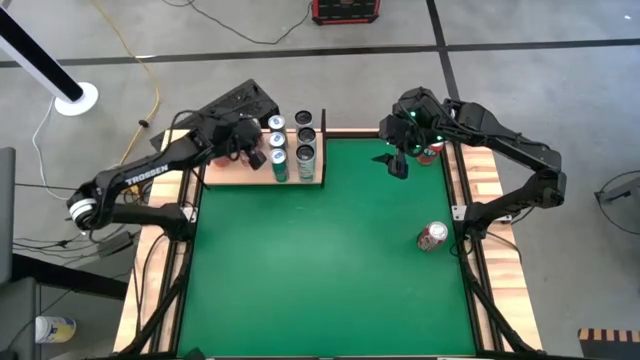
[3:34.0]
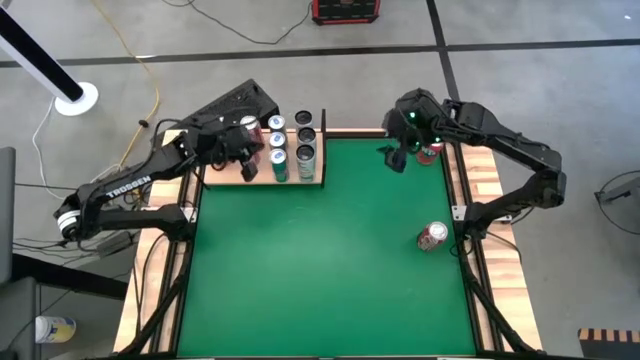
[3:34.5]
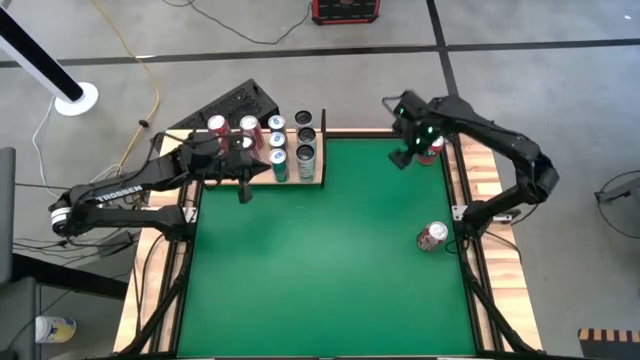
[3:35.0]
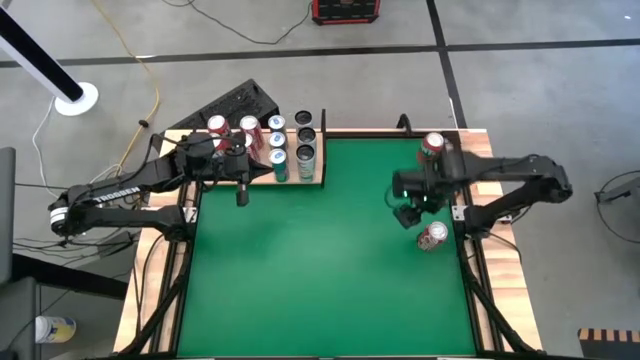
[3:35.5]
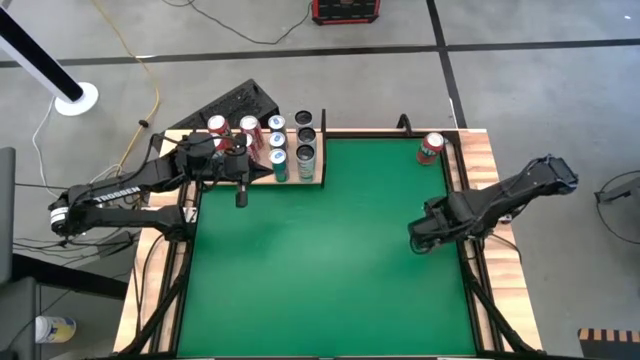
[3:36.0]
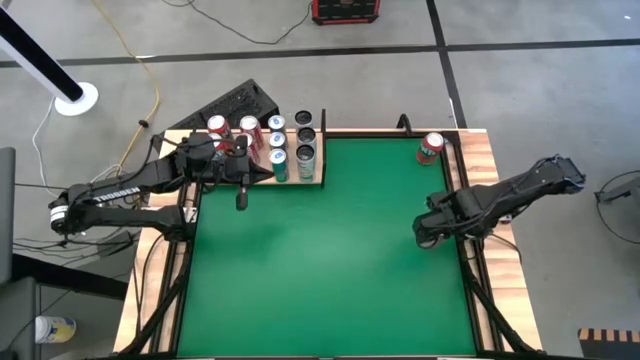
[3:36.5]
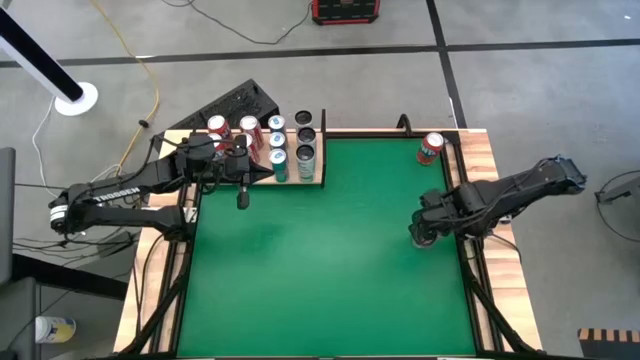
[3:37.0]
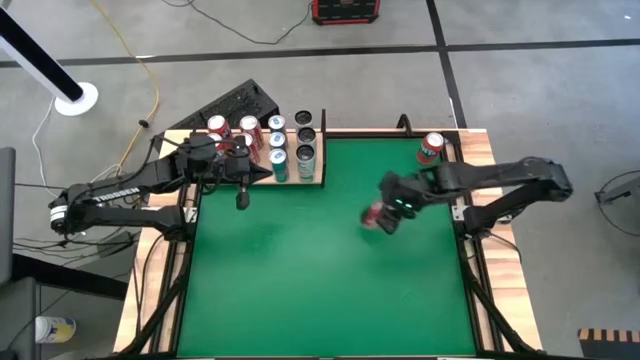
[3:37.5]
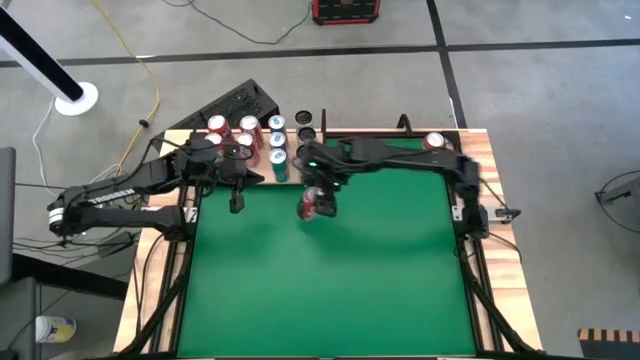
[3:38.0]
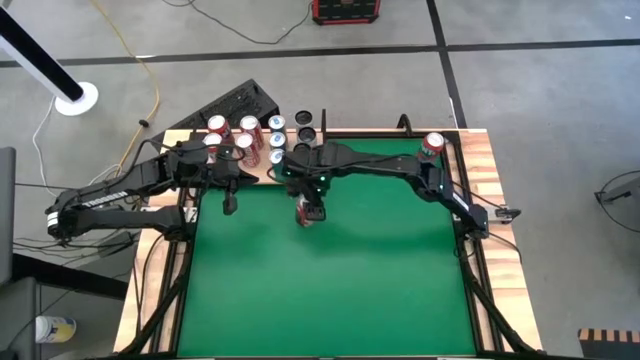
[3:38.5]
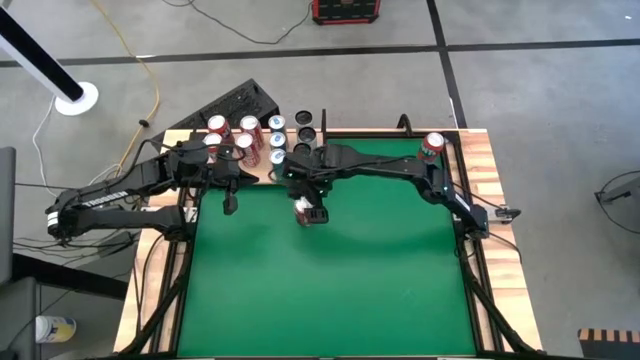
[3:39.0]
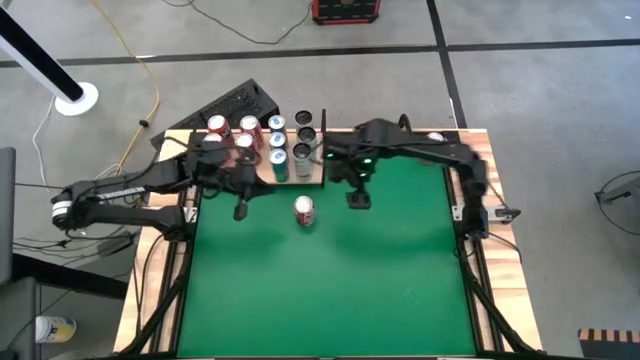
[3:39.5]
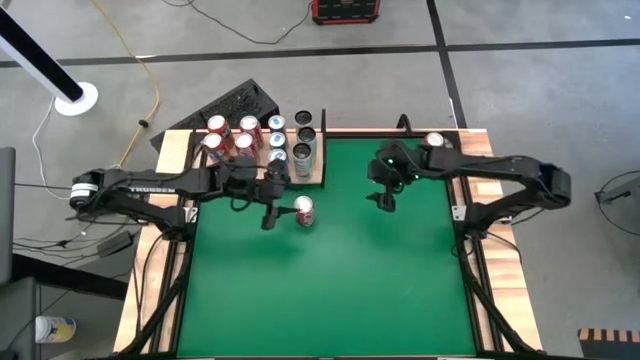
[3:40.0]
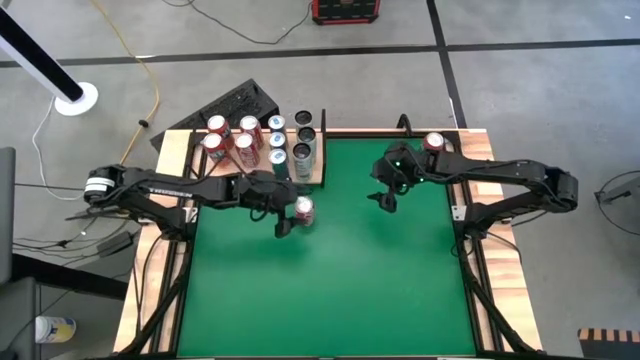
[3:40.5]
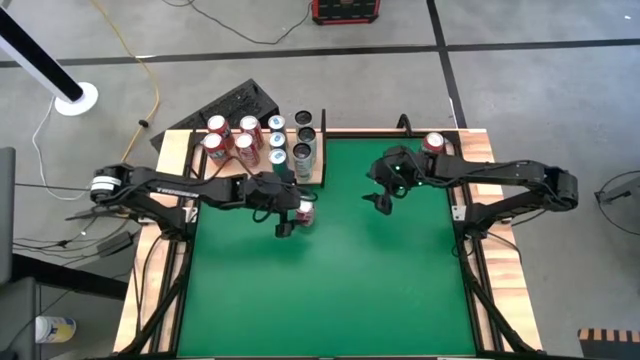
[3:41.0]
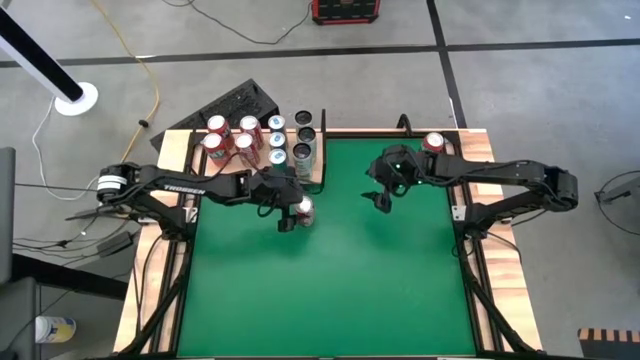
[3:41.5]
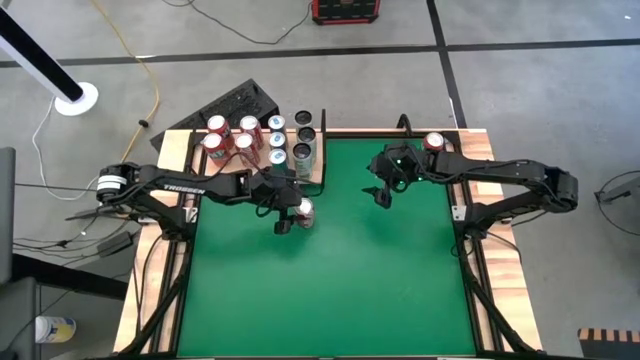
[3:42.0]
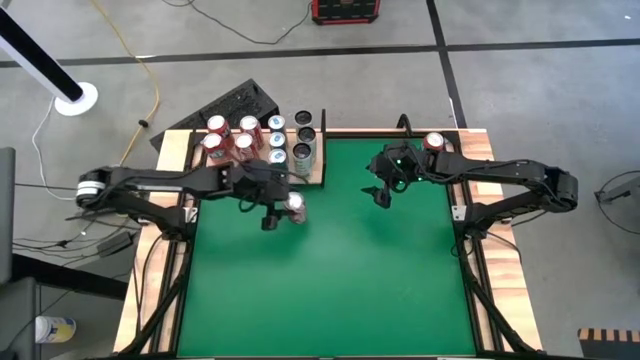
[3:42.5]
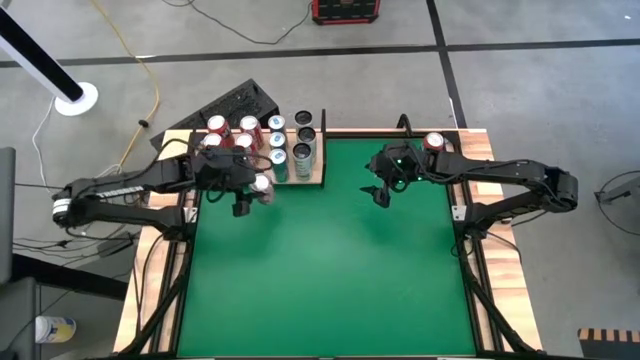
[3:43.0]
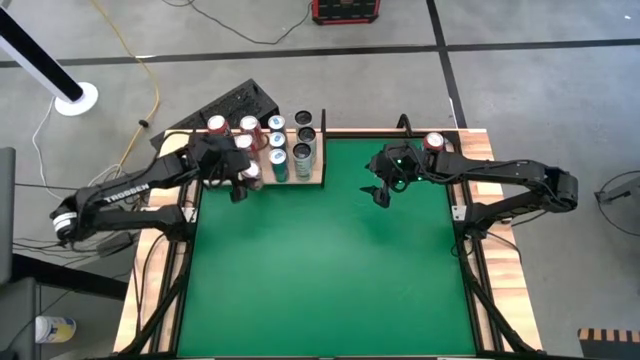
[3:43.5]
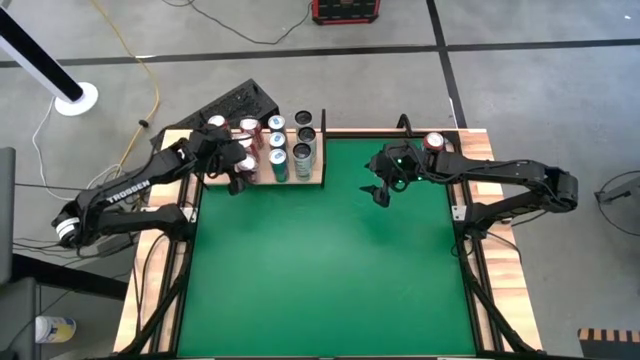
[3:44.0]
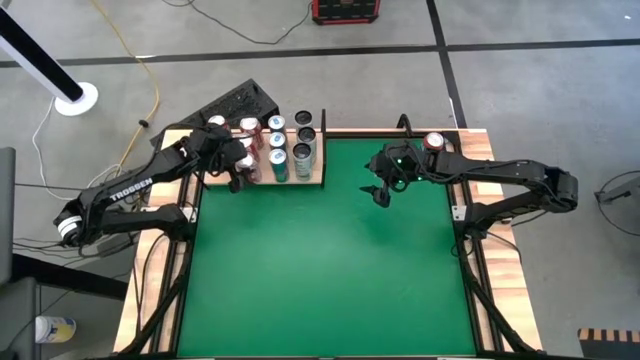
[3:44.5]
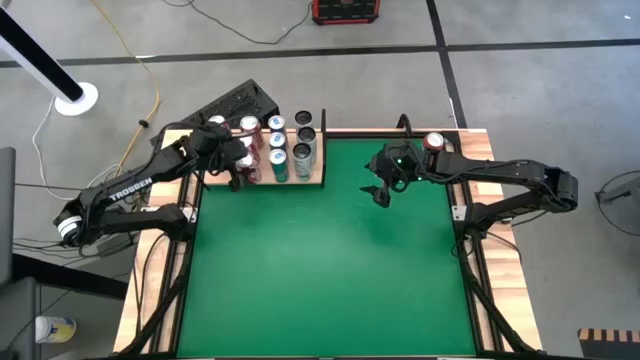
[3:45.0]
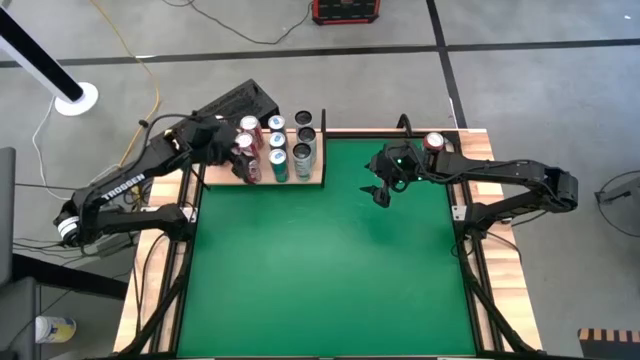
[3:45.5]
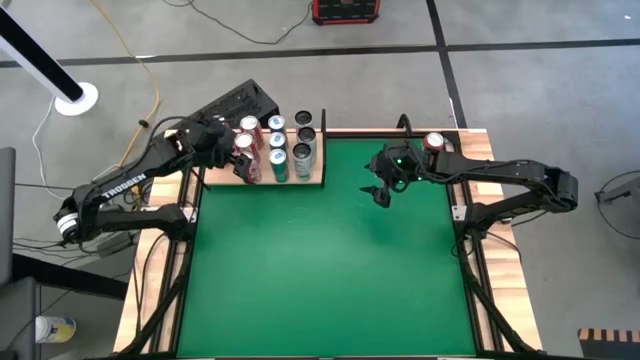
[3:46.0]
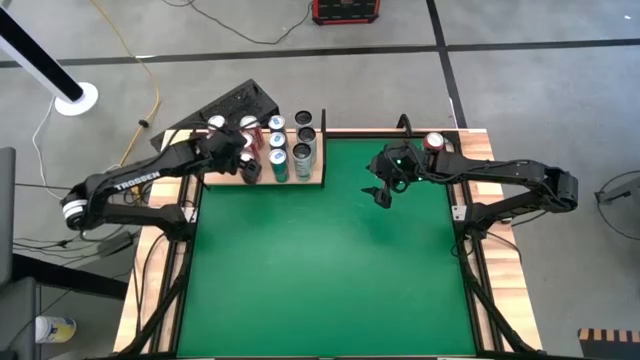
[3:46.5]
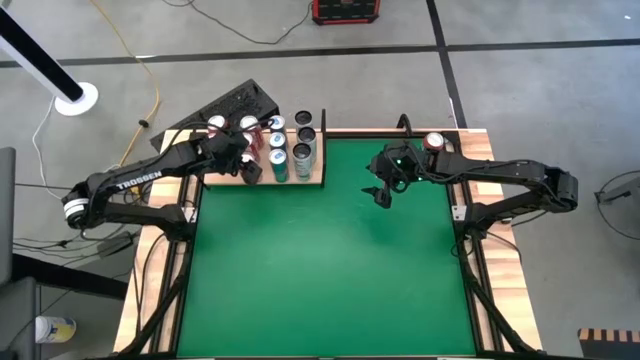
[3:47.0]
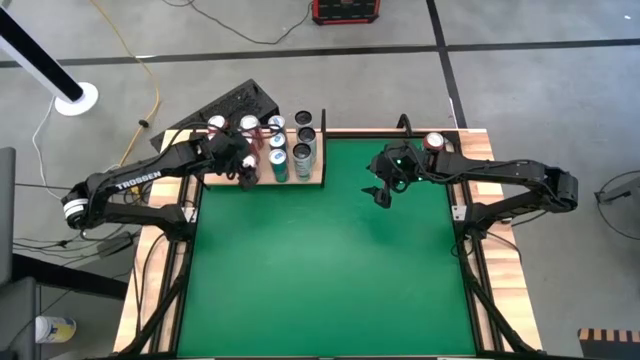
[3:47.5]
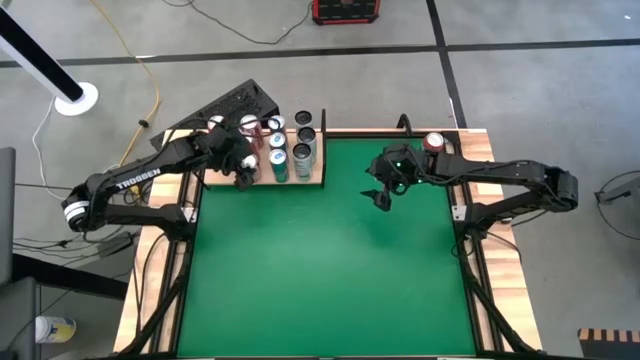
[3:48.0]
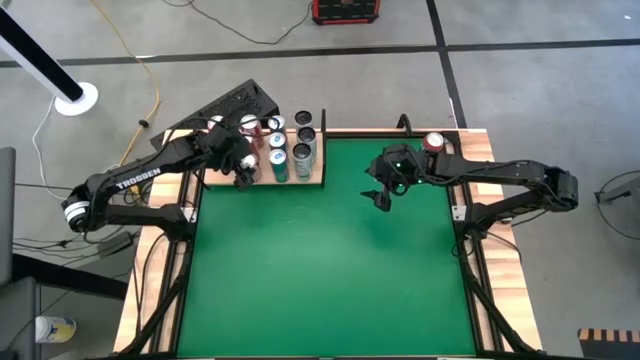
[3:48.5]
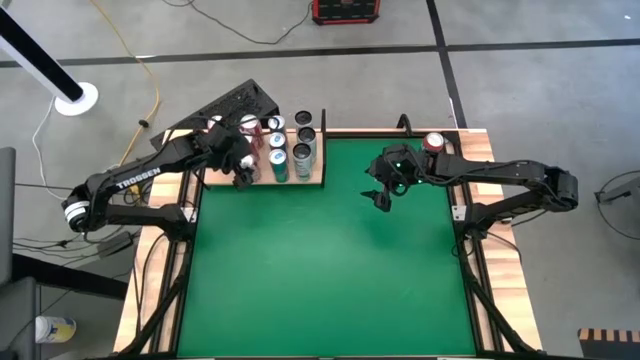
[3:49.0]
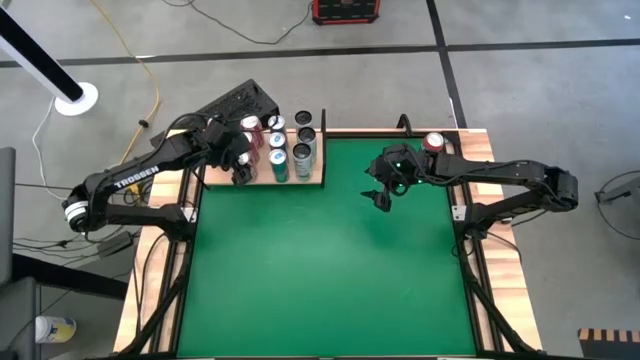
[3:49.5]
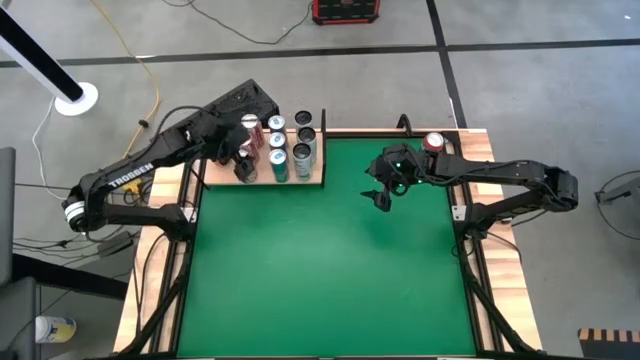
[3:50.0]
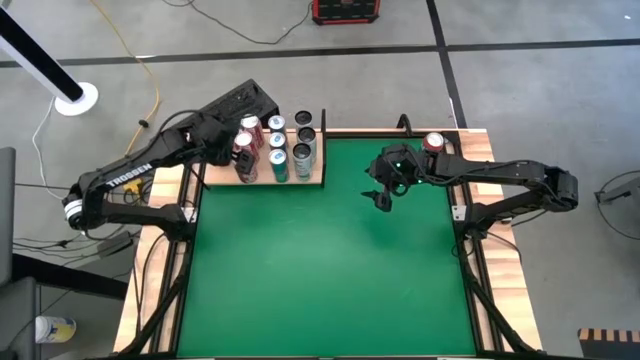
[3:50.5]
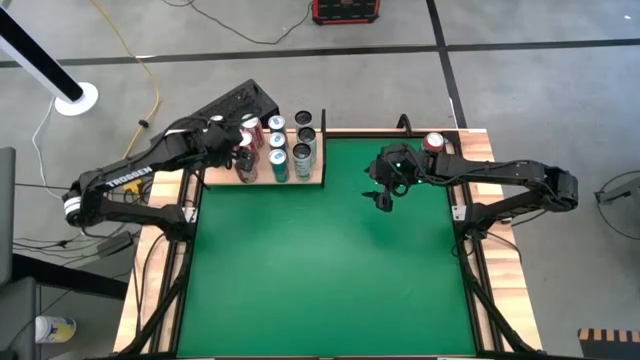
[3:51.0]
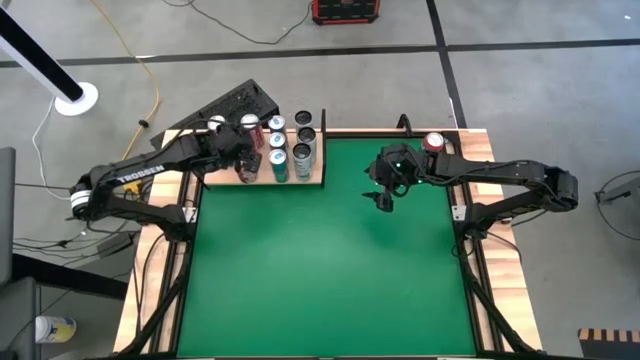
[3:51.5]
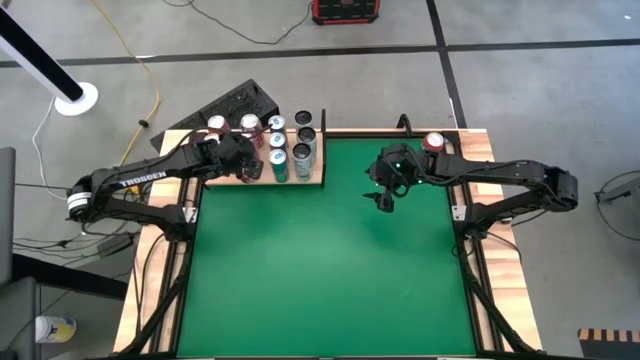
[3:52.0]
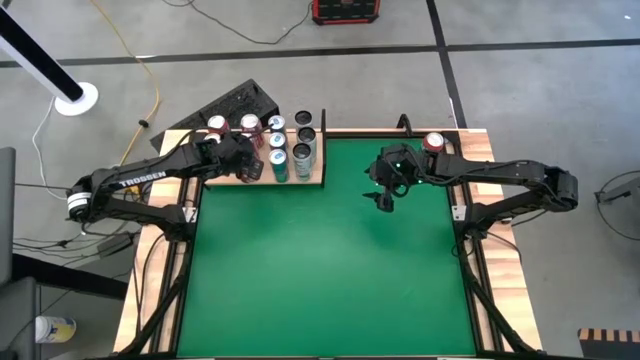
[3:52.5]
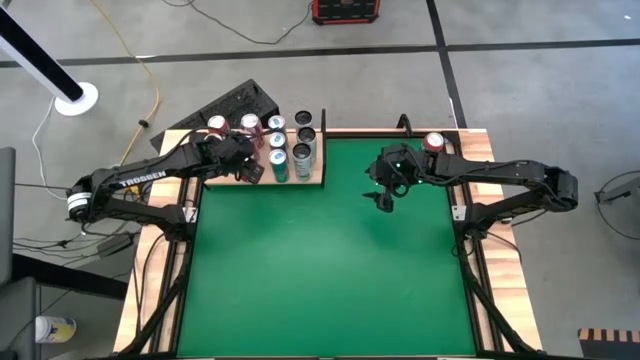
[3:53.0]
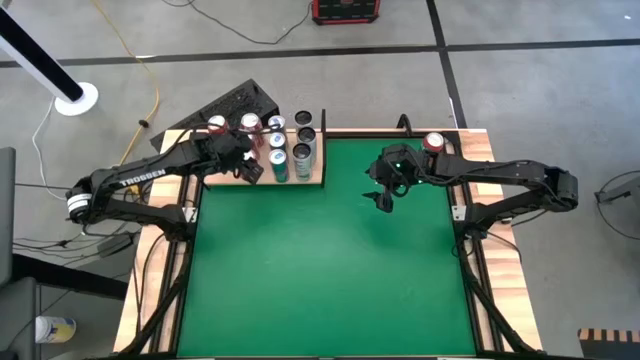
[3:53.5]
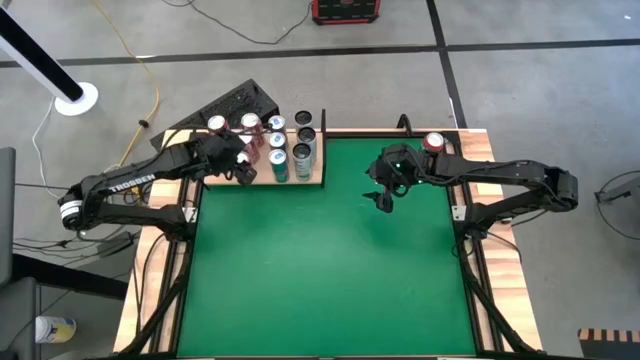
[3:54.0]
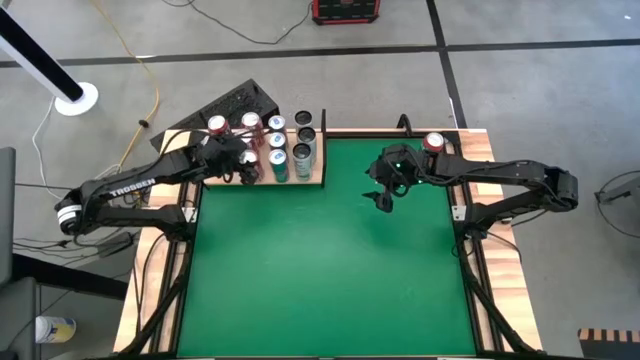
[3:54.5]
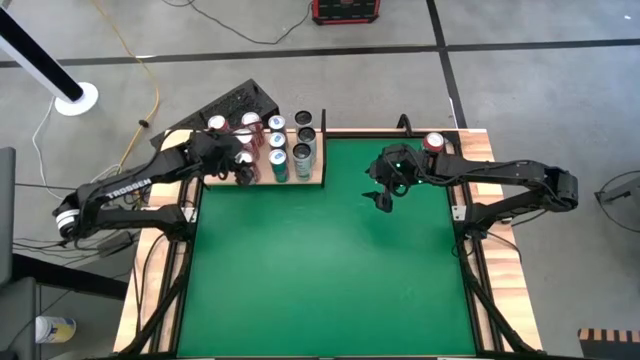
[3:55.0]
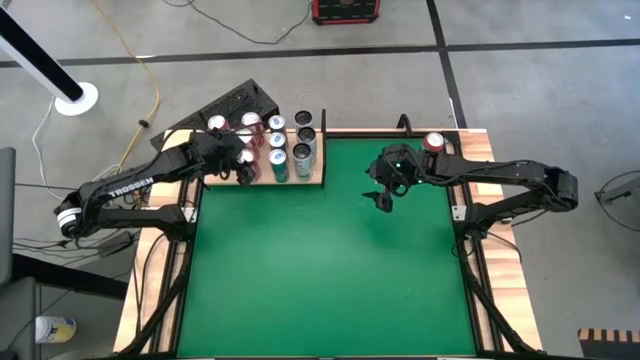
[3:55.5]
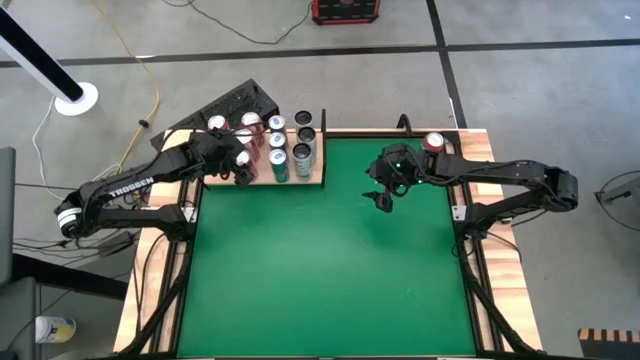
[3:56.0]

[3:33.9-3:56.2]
Task: Place canned beverage on shelf
Put the red soda can on the shelf aligned with the other red soda cans
